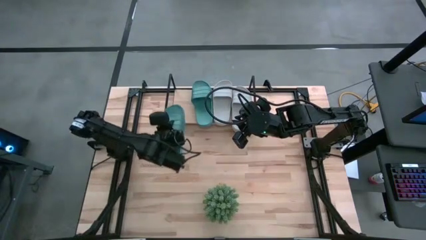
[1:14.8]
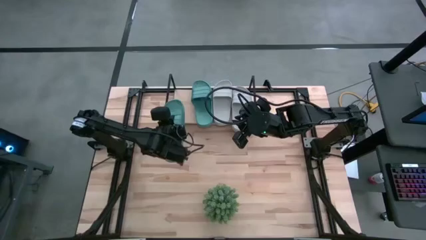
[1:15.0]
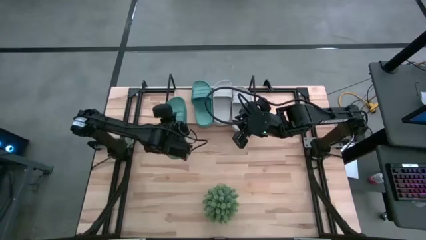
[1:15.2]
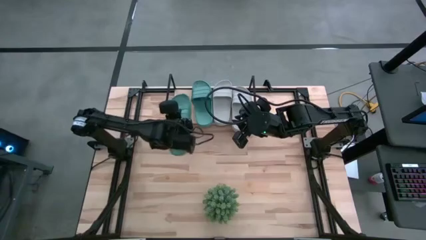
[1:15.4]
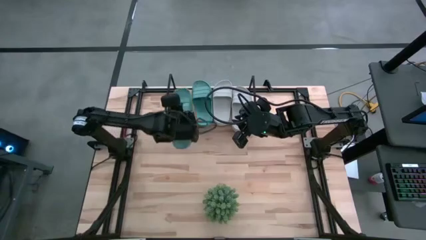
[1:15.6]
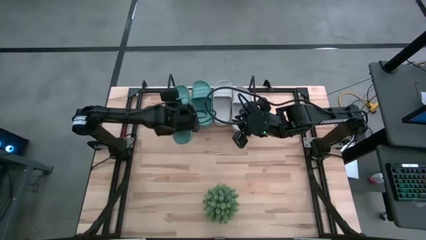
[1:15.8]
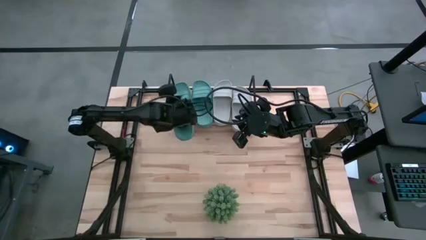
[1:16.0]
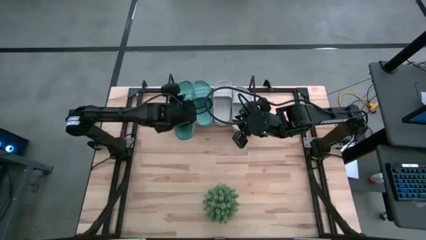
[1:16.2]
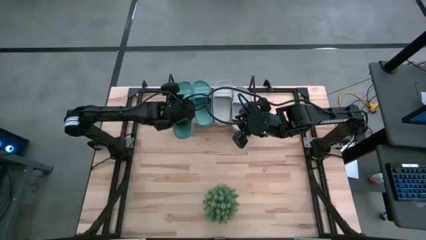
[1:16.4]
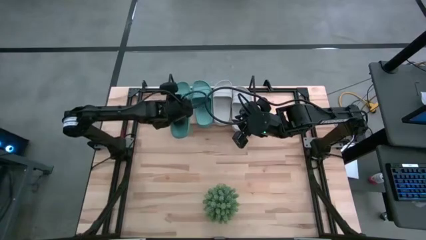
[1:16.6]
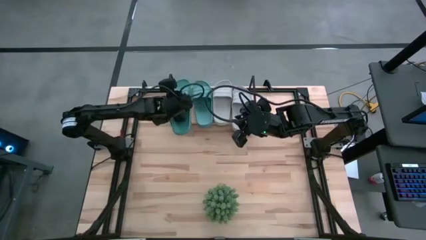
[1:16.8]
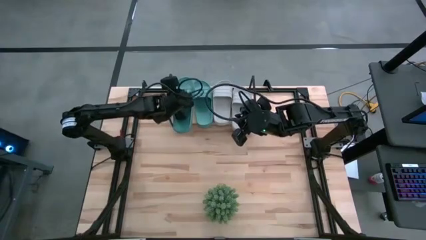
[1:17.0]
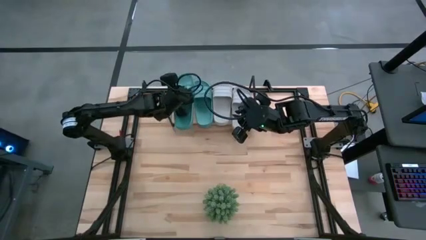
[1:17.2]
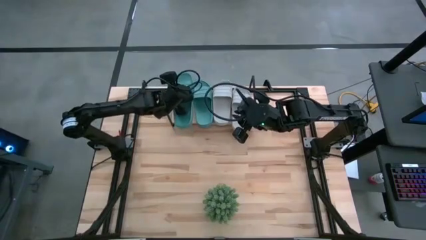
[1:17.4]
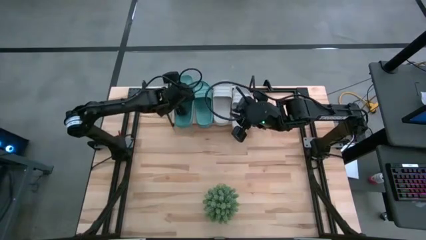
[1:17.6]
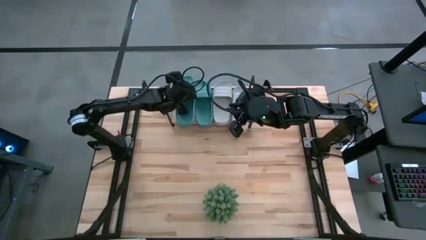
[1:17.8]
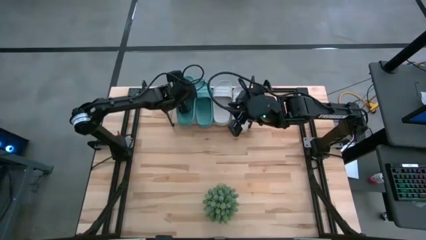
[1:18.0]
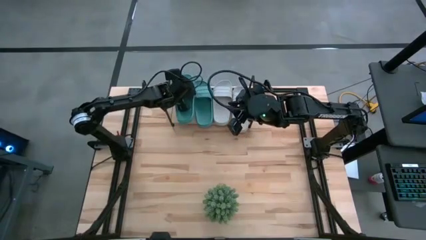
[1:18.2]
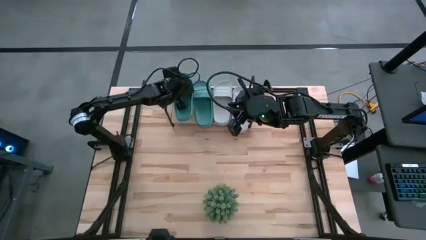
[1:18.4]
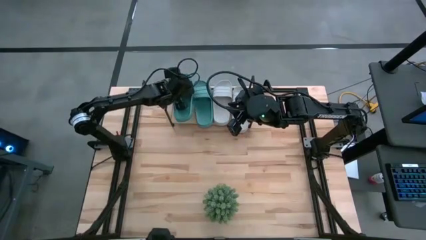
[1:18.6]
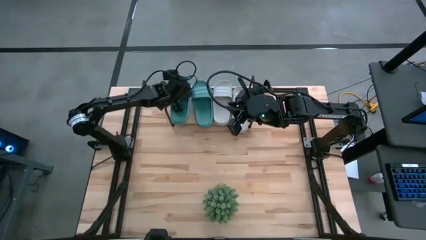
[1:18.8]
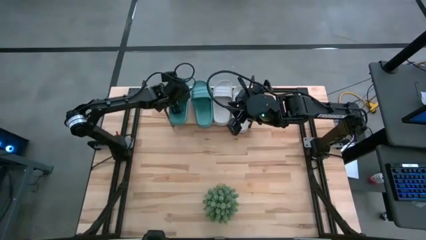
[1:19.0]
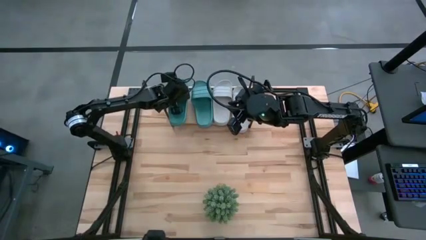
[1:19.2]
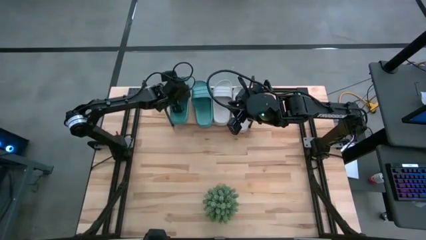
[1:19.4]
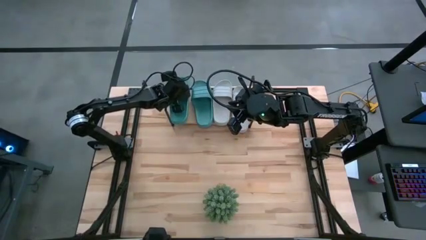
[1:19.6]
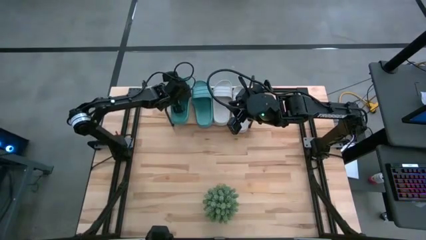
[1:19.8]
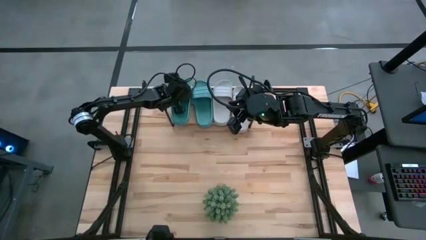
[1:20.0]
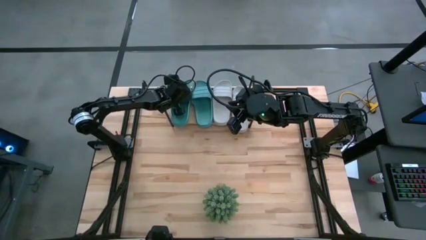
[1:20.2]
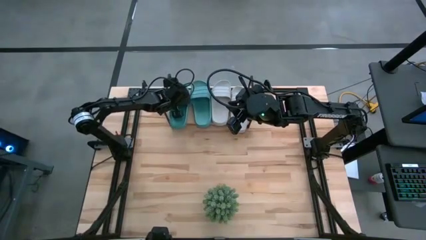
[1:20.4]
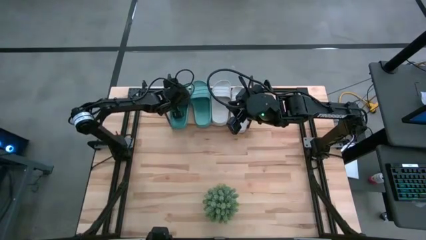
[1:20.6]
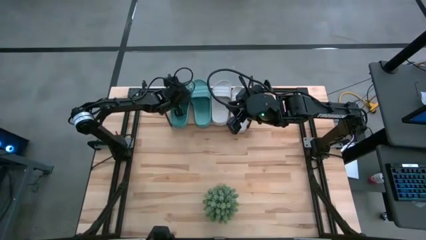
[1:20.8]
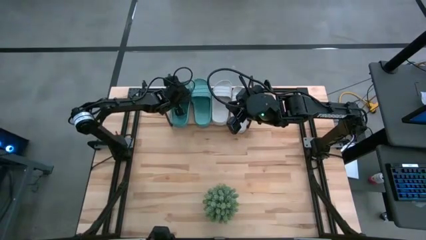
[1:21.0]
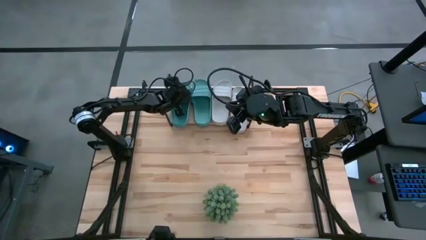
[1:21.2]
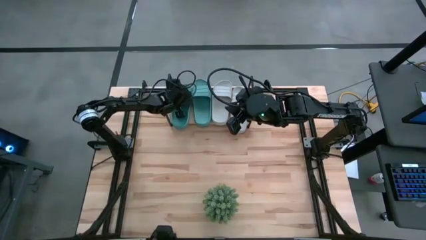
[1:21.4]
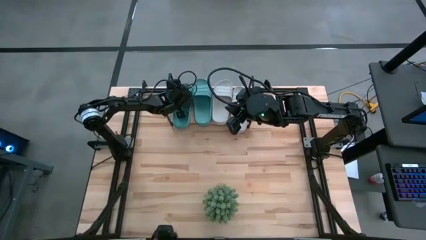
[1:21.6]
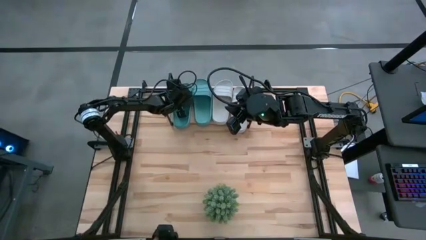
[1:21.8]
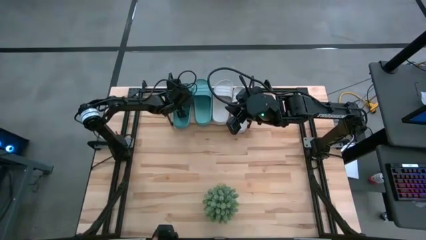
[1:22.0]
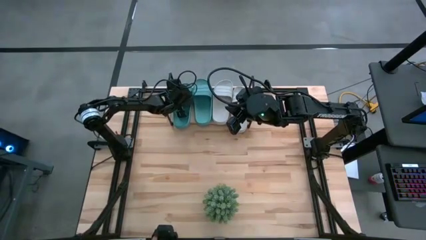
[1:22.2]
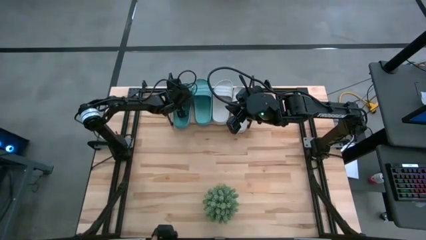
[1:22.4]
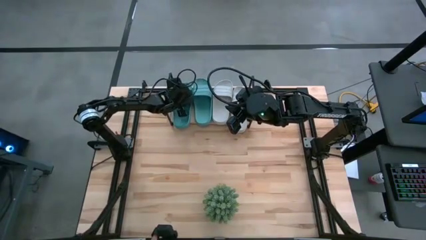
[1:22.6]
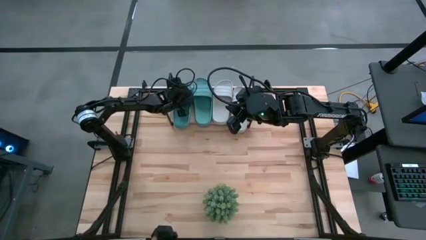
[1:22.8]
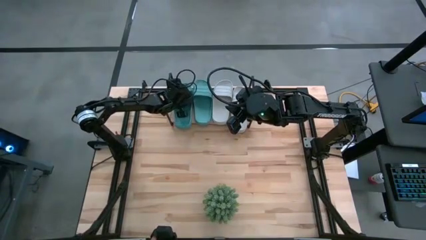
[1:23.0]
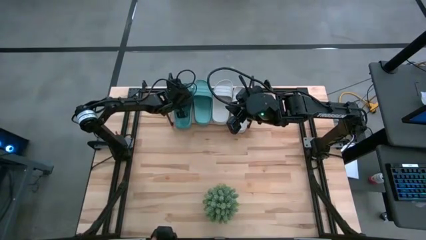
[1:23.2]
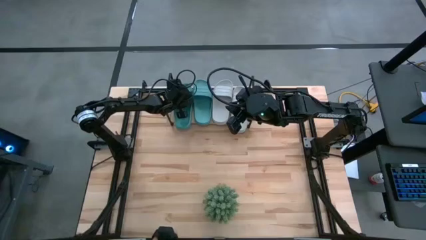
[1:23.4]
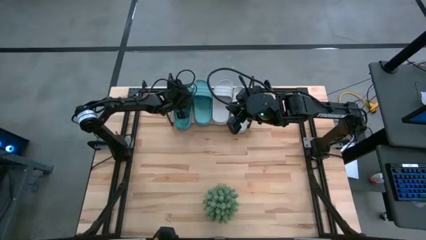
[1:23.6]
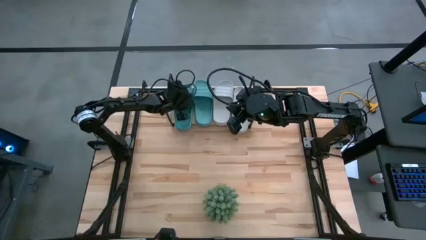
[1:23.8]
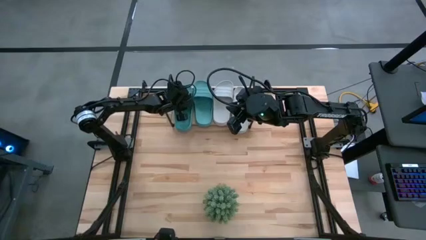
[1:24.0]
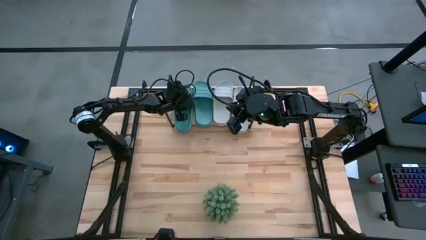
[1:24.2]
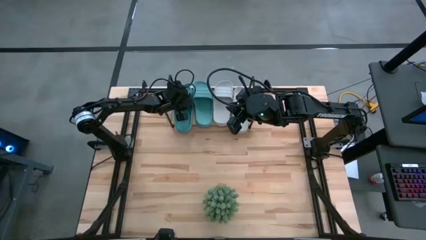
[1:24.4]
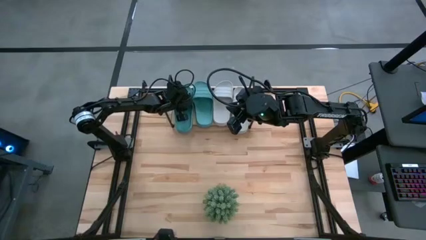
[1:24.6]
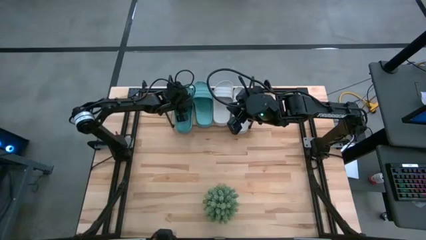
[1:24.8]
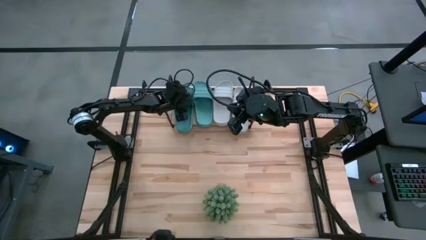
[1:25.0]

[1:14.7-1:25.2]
Task: Pick and place slides into the shelf
Put the green slipper on the shelf

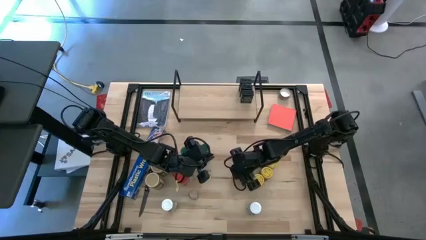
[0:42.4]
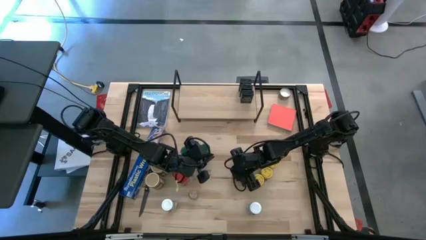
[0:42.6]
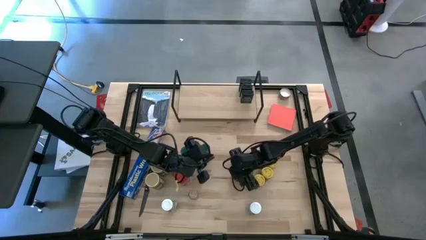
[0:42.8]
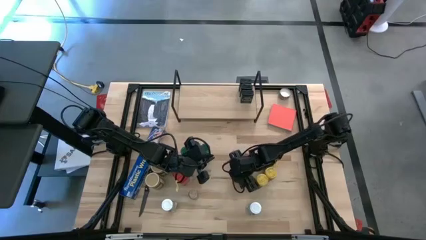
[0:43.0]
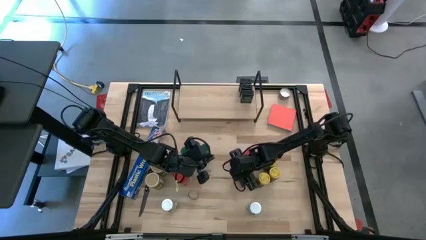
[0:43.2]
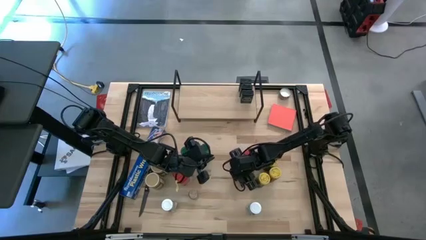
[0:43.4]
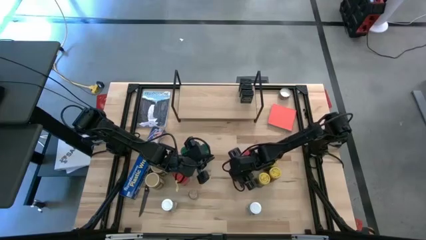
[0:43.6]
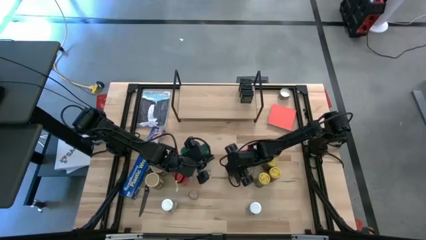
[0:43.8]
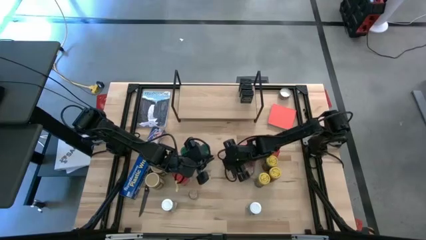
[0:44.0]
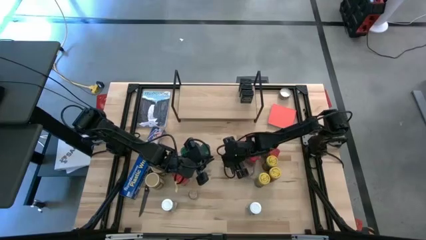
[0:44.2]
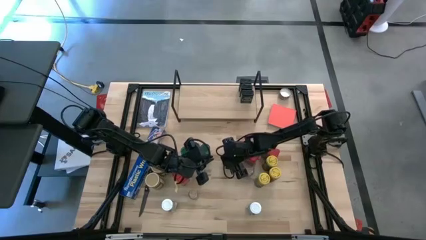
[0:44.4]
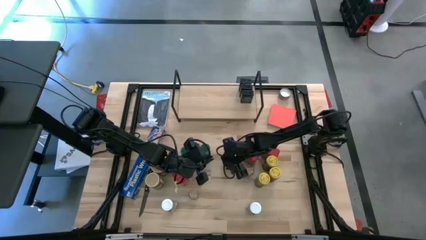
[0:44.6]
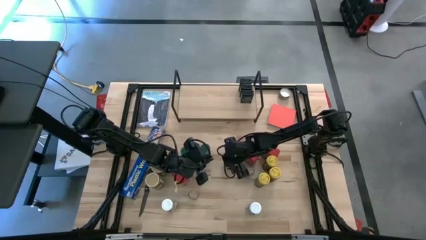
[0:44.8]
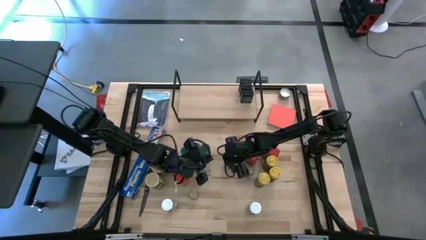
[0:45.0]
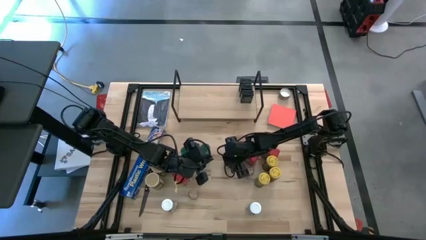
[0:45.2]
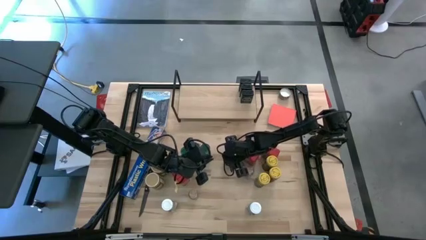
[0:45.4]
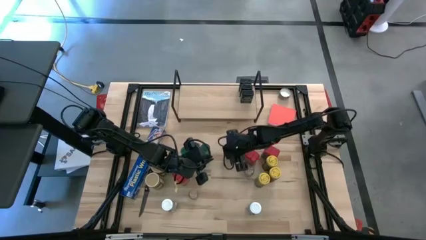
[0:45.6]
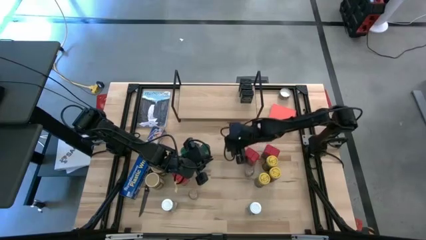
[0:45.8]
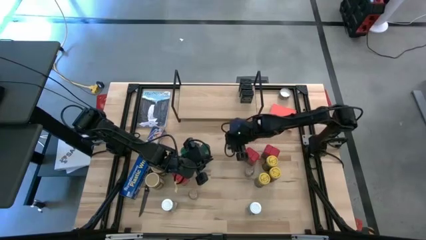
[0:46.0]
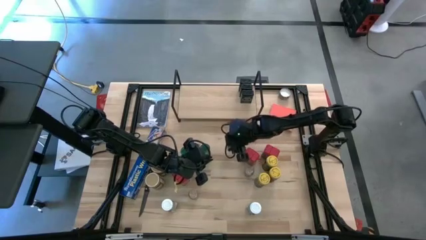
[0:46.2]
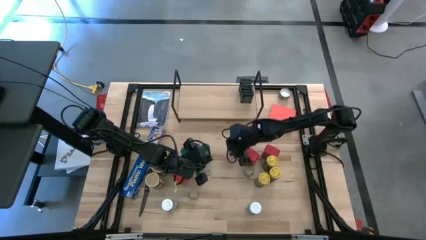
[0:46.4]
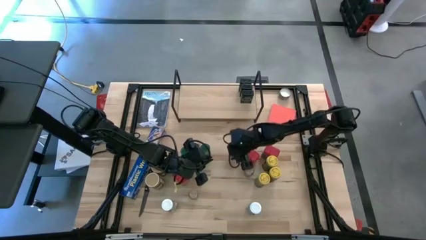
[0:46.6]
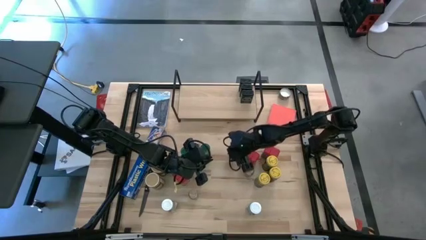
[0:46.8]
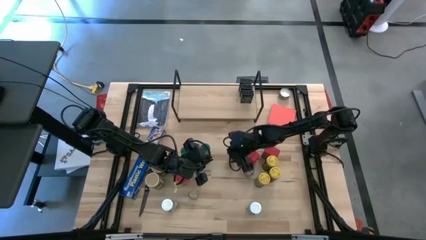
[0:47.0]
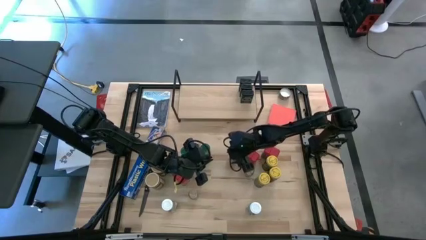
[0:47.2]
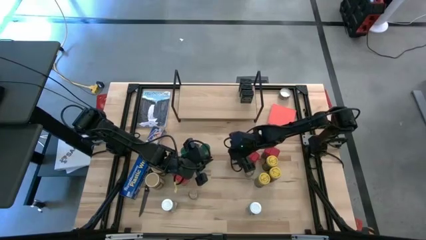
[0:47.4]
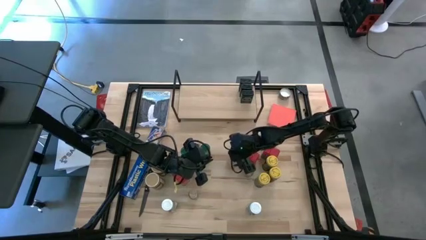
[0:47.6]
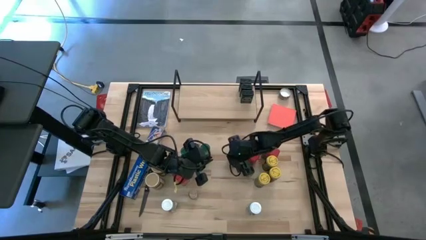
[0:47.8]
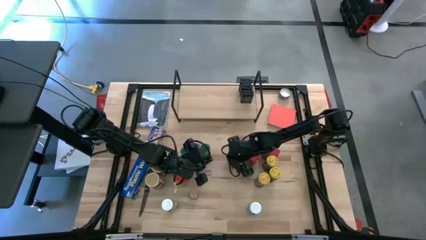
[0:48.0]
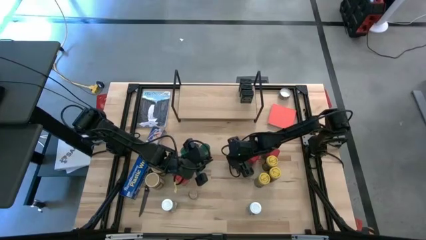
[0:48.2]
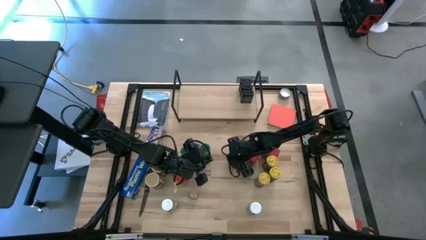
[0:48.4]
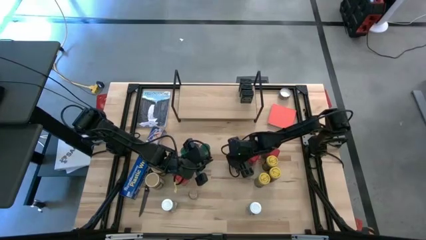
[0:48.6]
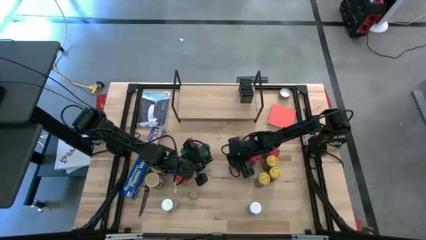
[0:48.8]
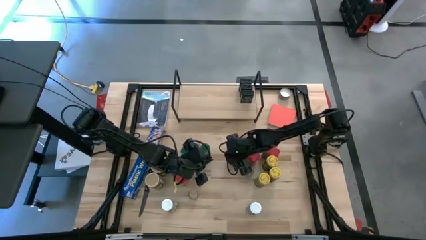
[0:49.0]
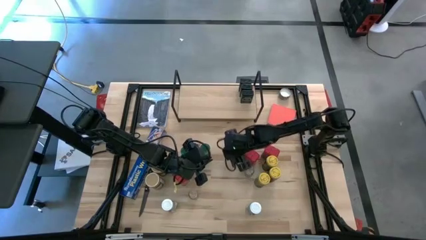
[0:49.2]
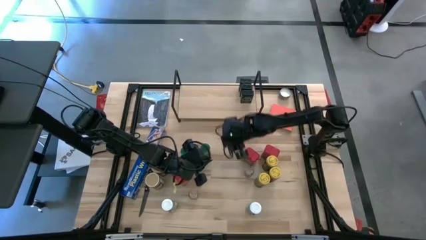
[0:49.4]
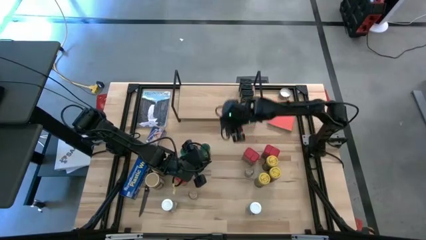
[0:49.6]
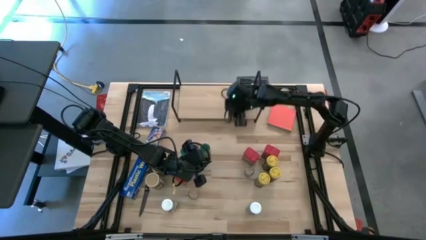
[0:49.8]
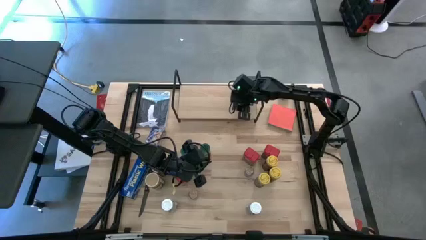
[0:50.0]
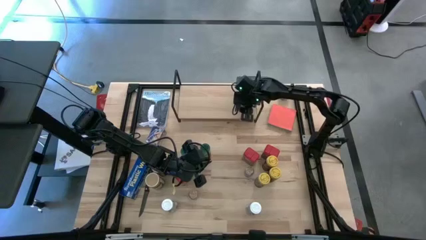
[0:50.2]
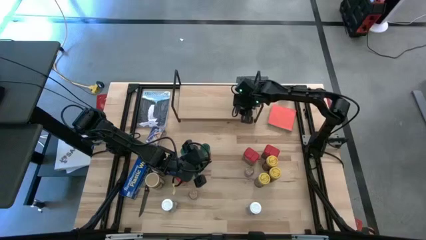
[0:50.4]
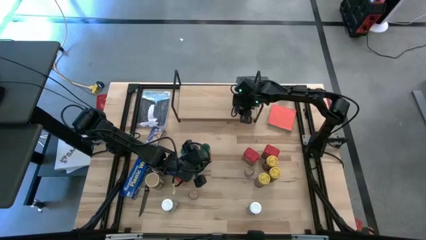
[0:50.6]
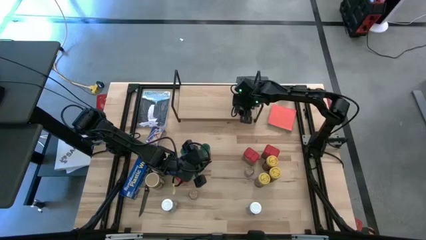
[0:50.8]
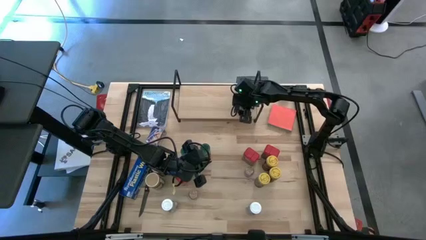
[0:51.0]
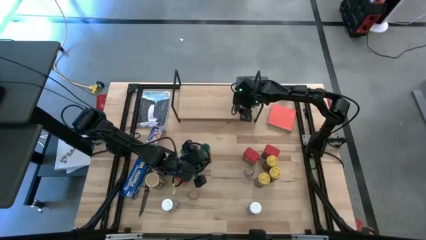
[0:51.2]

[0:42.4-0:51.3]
Task: Shelf spices
Put the transparent seasoning bottle on the shelf
